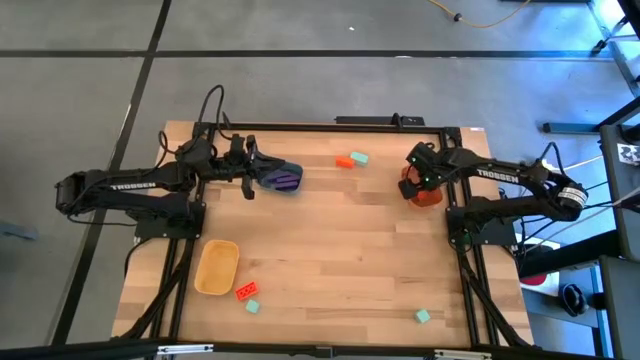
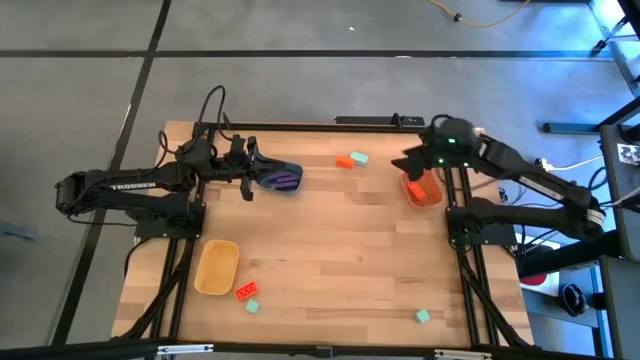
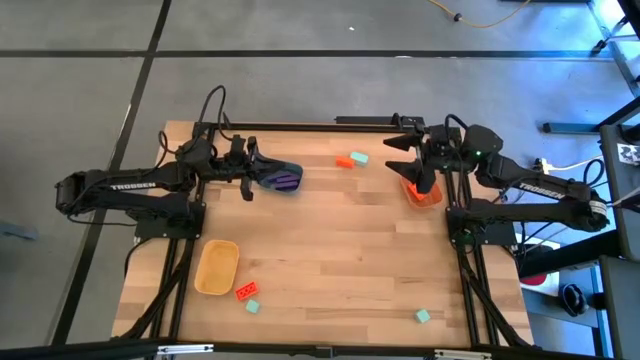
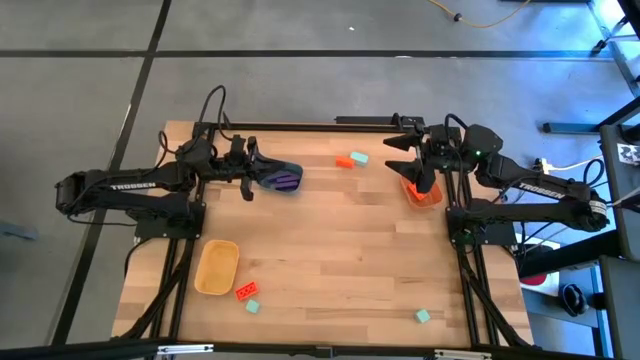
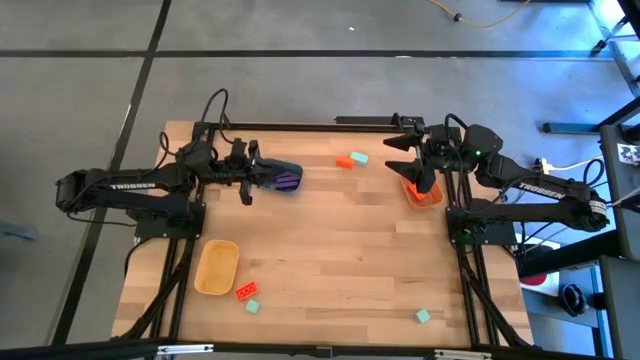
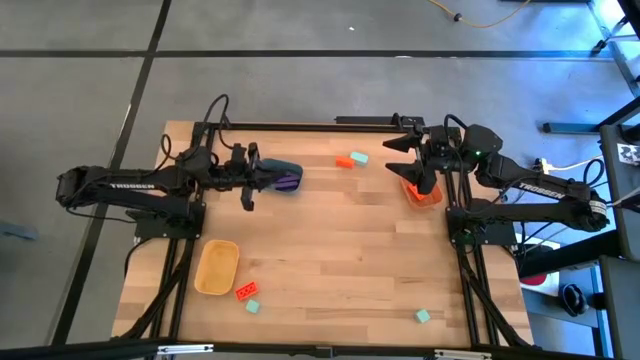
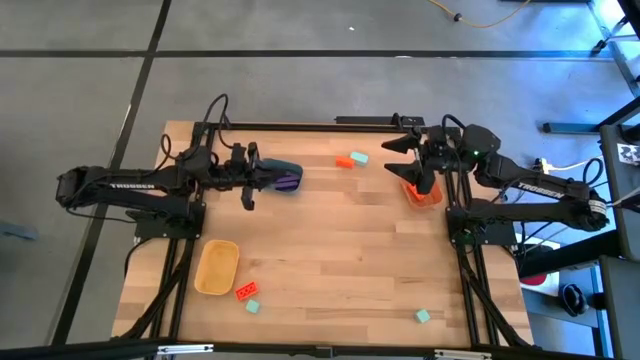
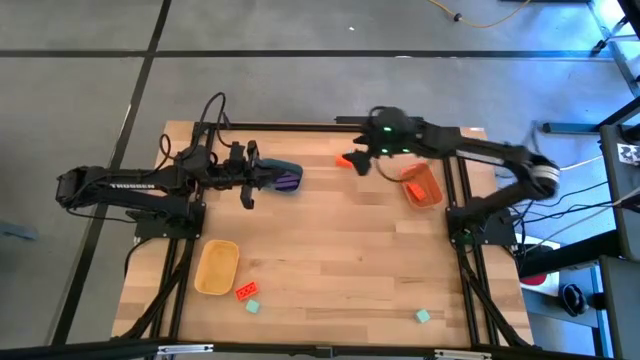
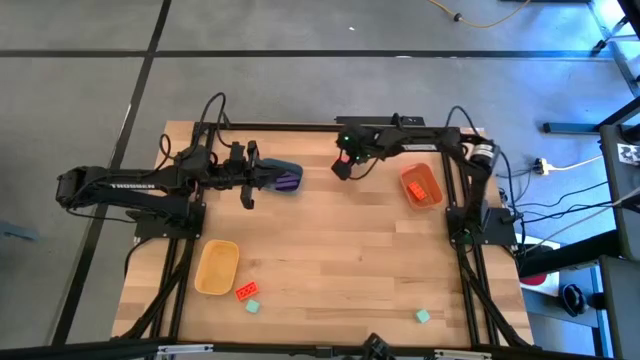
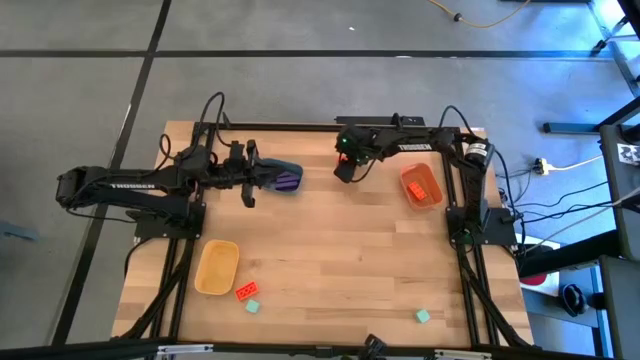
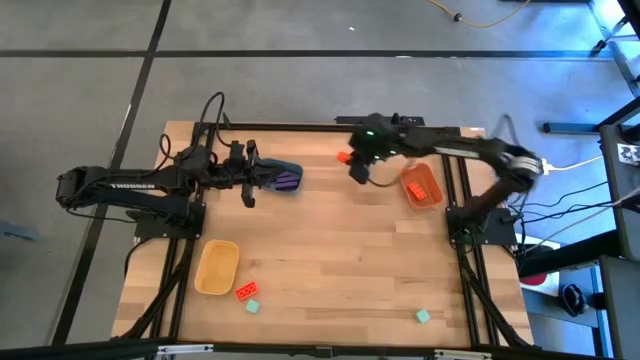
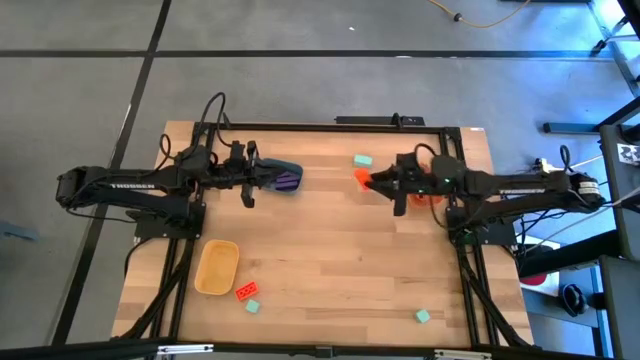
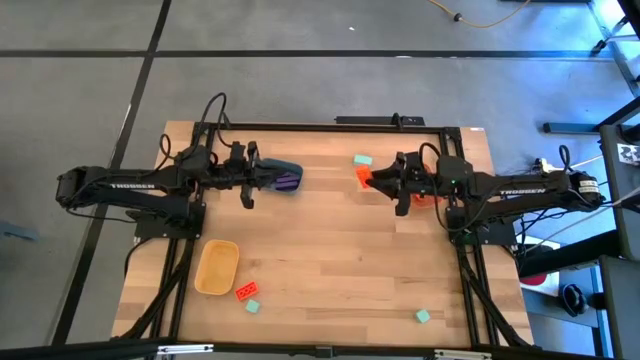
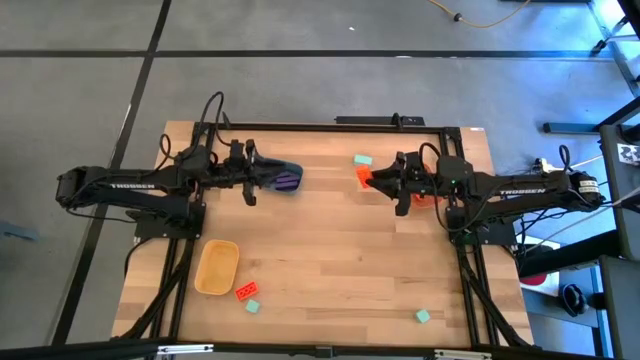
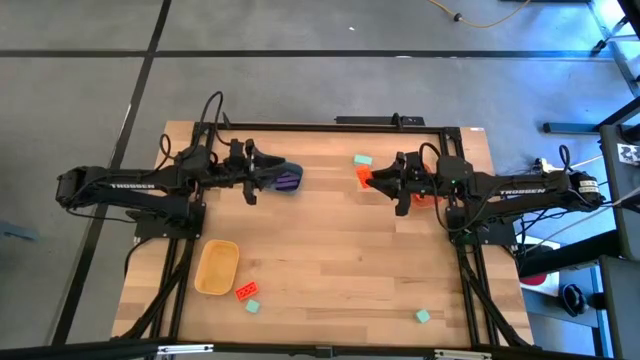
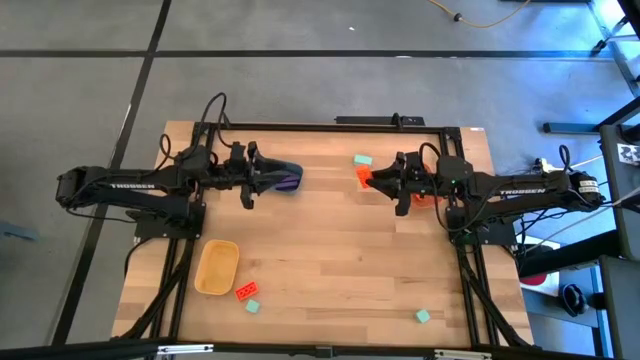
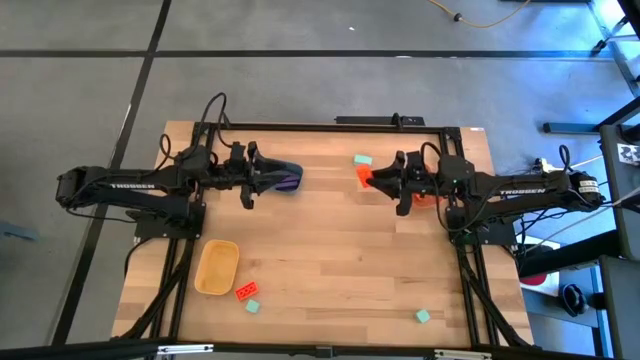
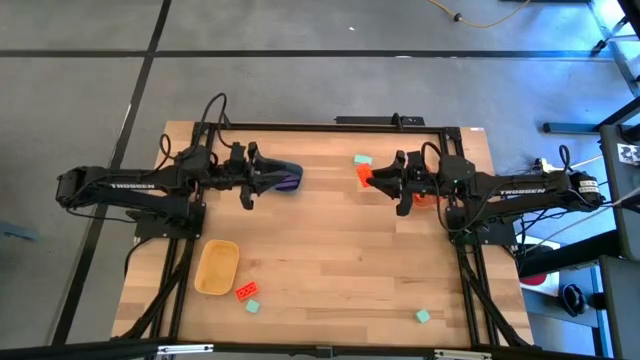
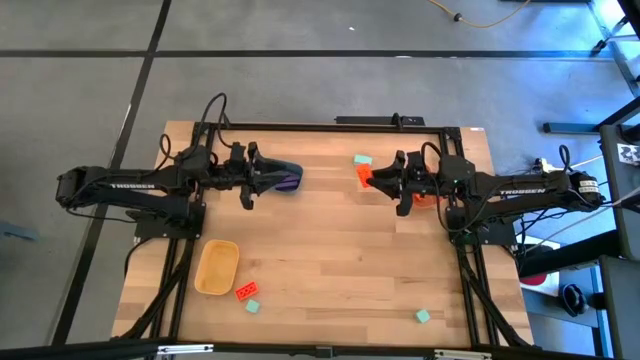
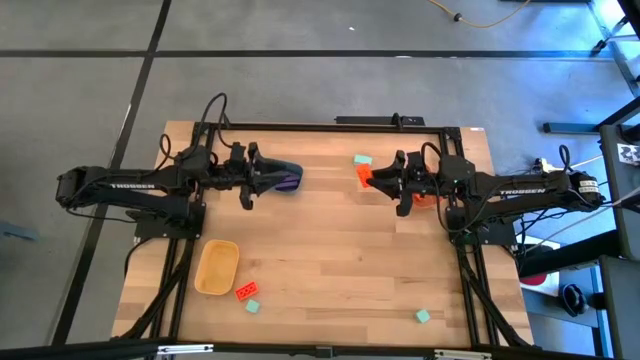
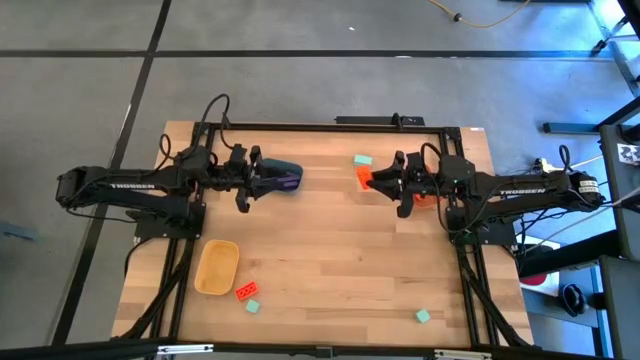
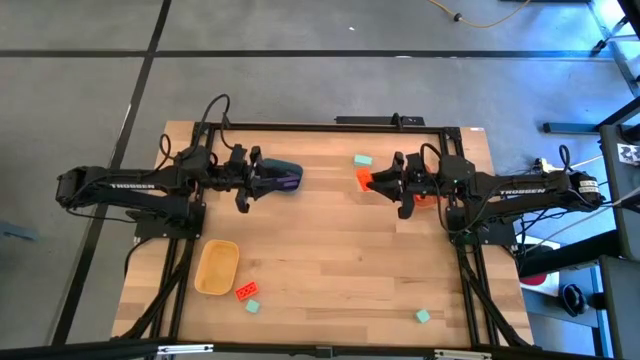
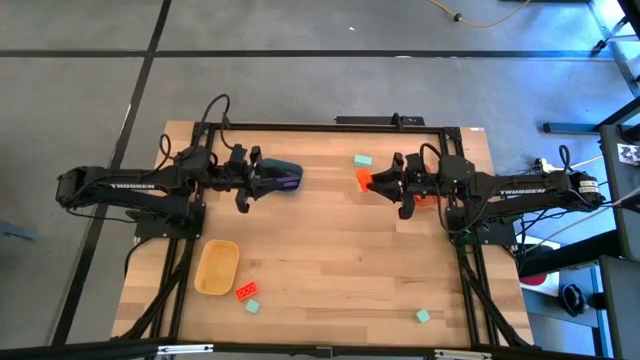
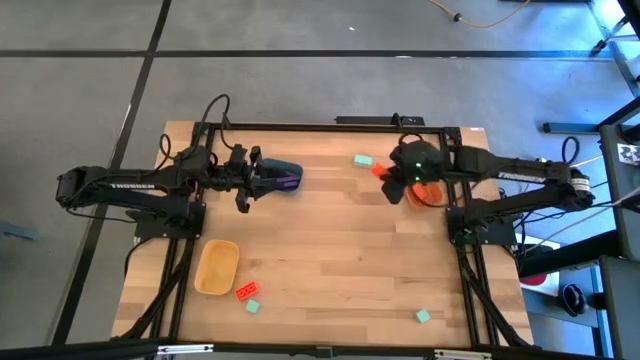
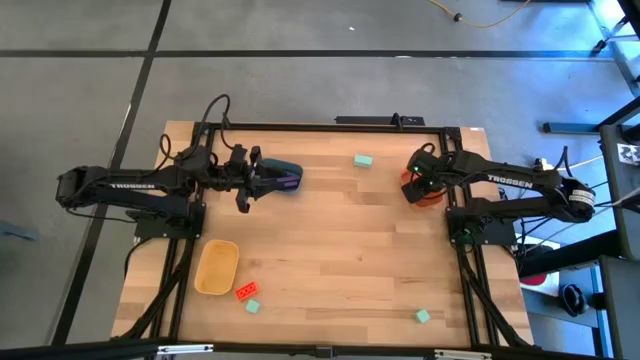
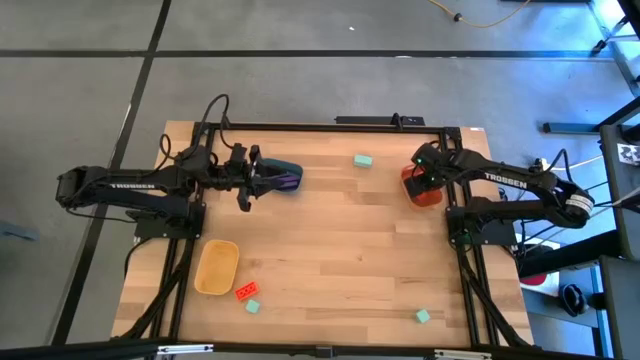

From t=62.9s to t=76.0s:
Task: Sort & place blocks by color
Put the top center orange 8 stud game piece into the orange bin
